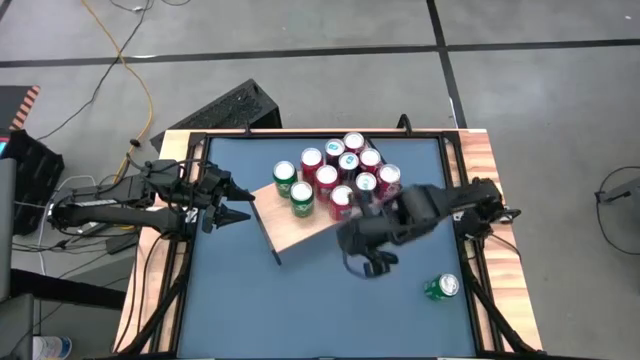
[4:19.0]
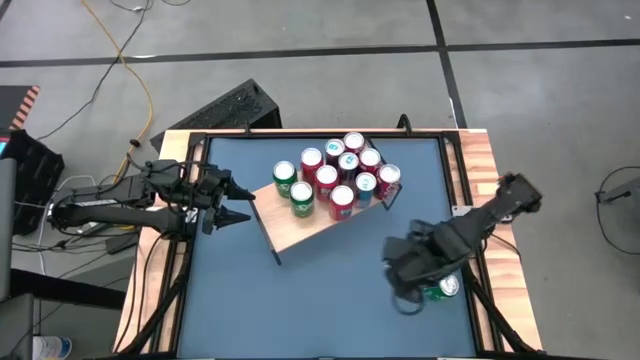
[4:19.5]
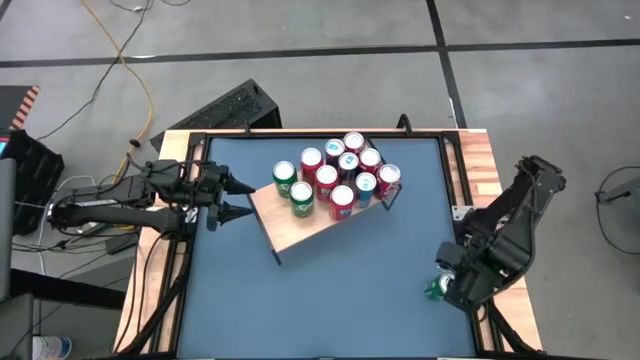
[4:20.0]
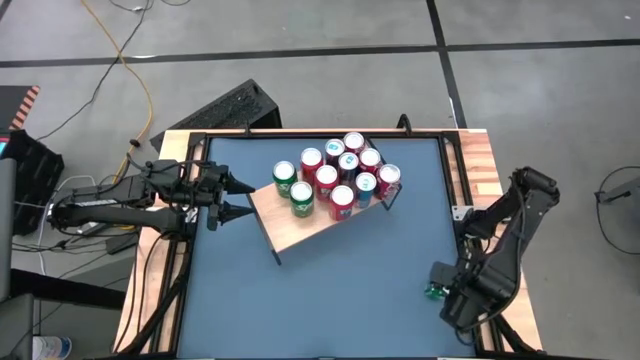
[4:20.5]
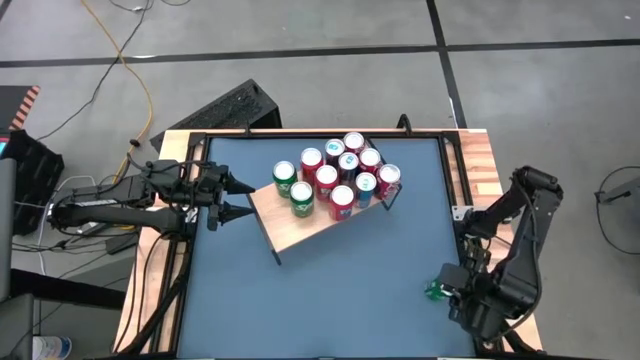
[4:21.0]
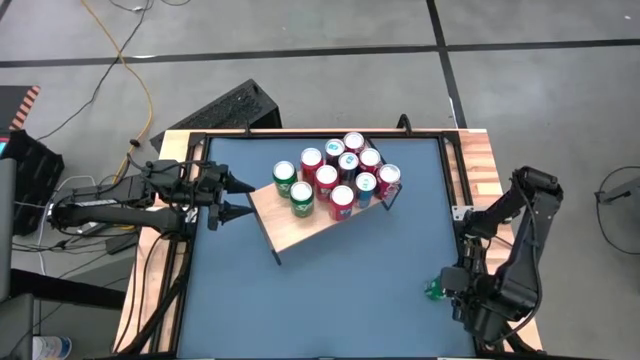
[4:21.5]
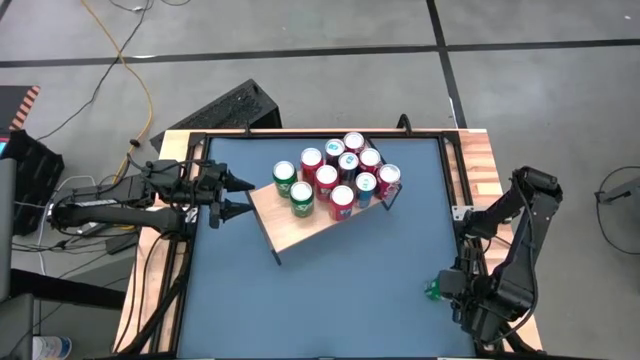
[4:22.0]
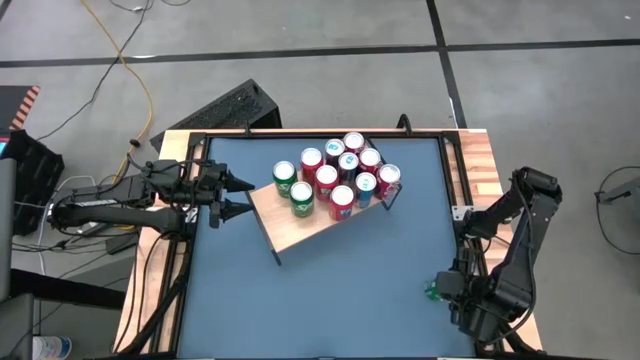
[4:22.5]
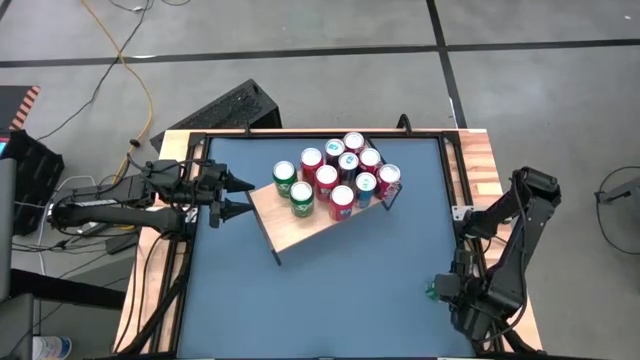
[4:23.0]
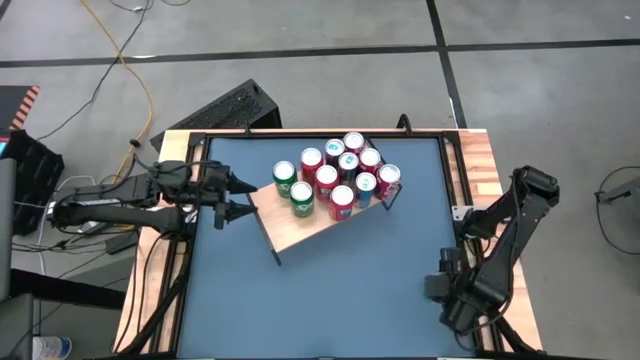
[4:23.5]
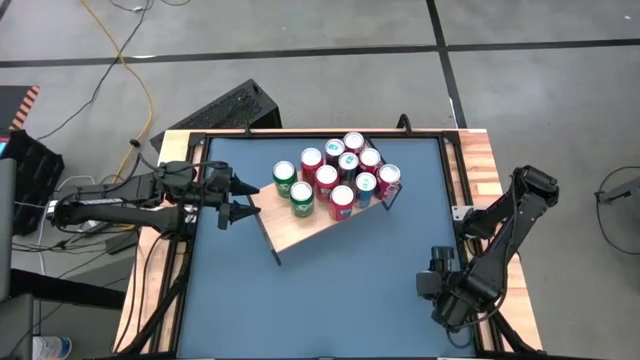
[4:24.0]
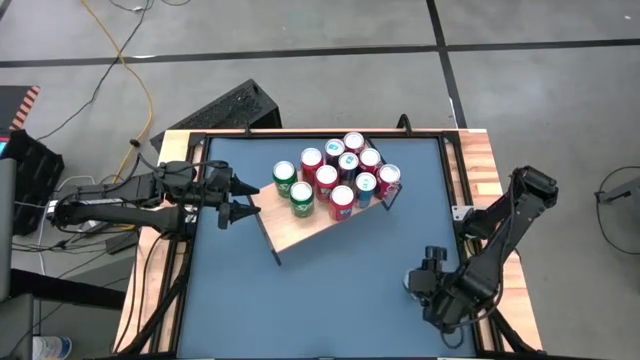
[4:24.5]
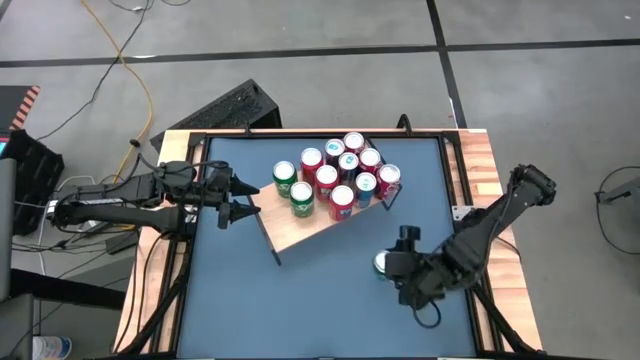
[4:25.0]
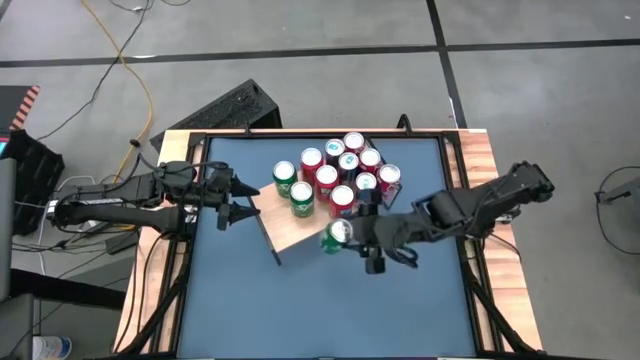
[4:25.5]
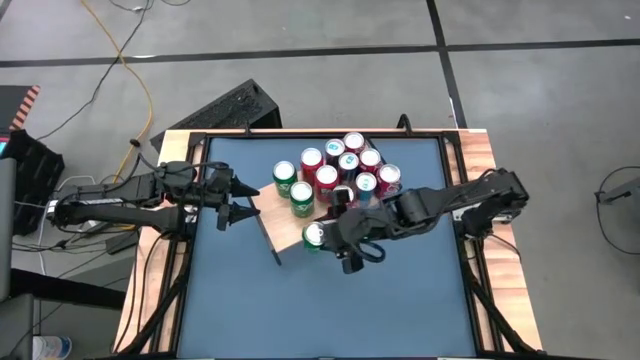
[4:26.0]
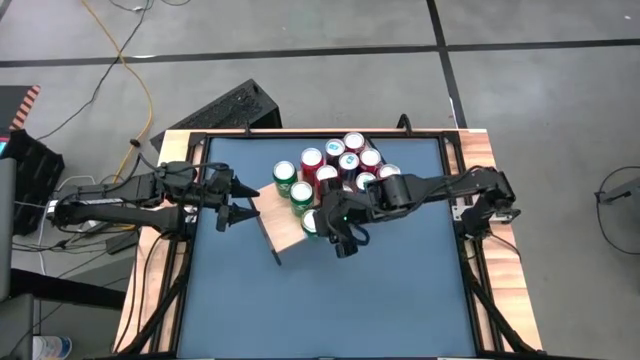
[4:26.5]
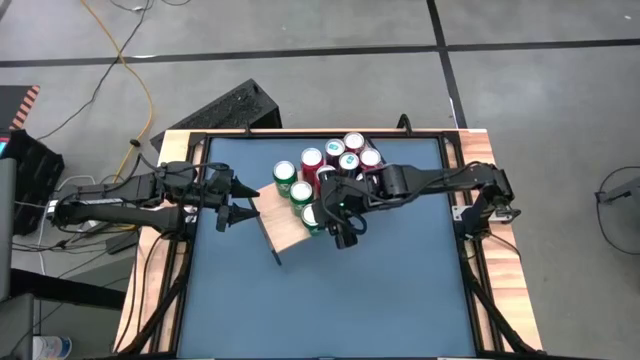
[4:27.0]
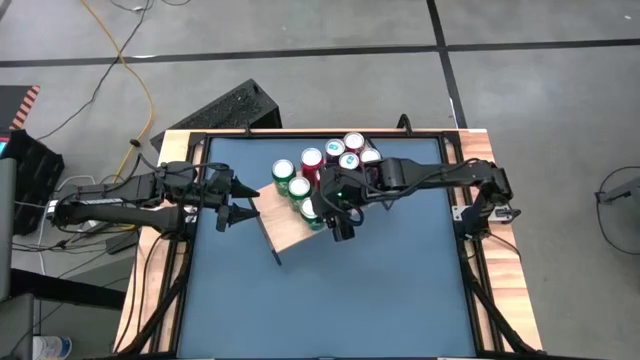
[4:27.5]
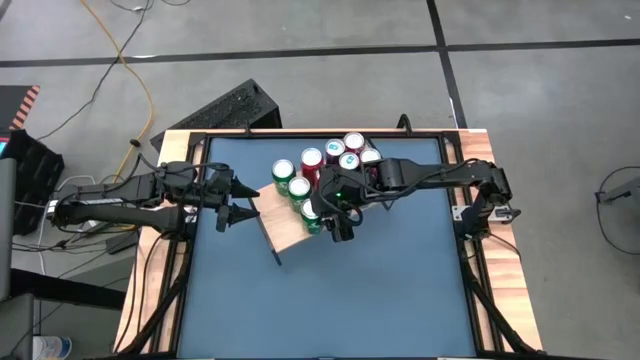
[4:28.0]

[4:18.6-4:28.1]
Task: Place canned beverage on shelf
Put the green soda can on the shelf aligned with the other green soda cans

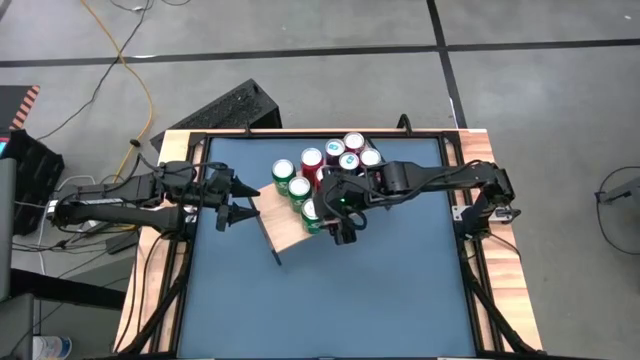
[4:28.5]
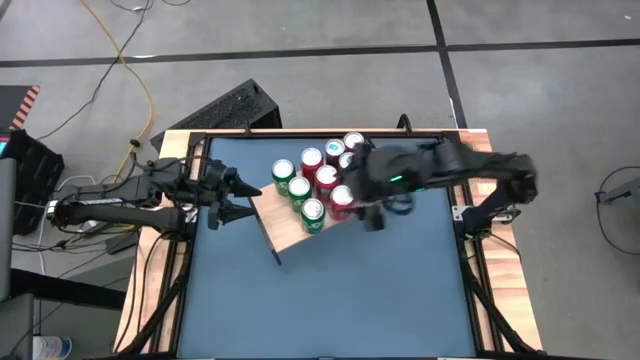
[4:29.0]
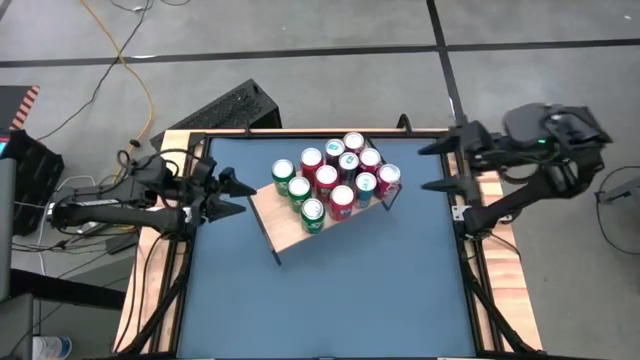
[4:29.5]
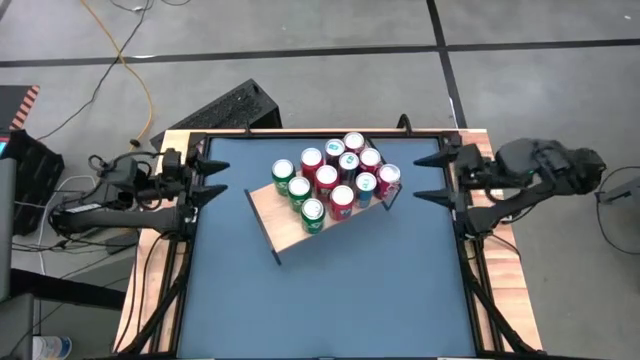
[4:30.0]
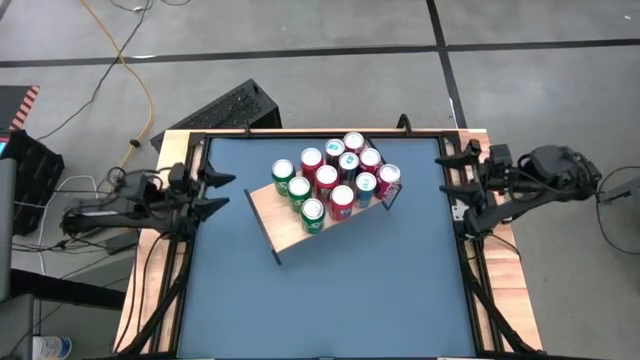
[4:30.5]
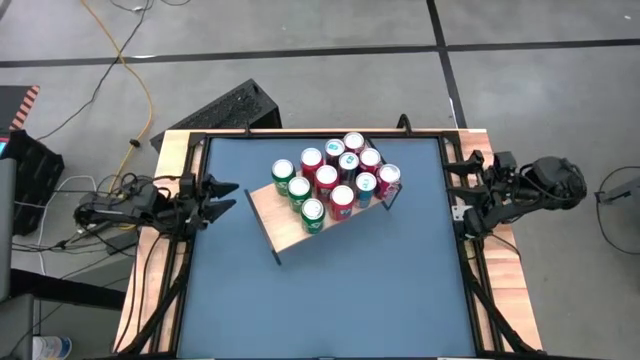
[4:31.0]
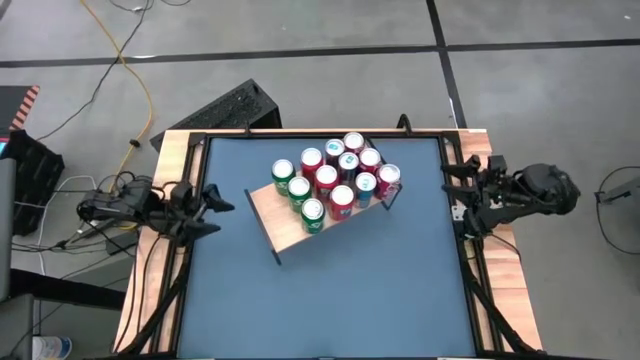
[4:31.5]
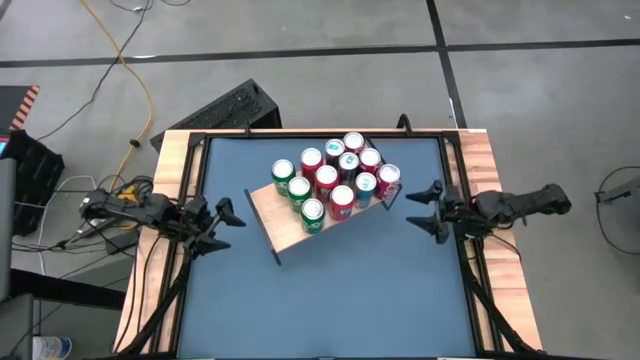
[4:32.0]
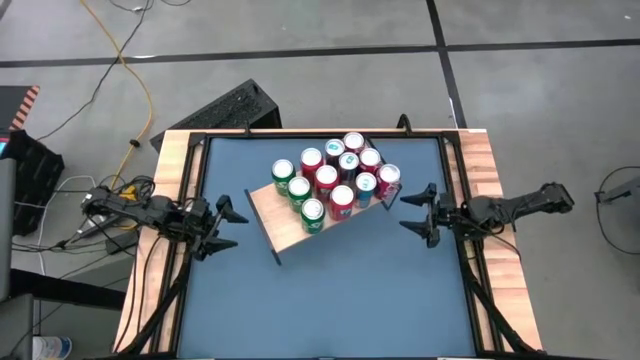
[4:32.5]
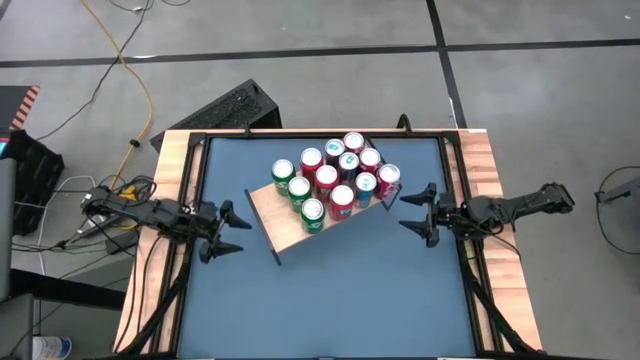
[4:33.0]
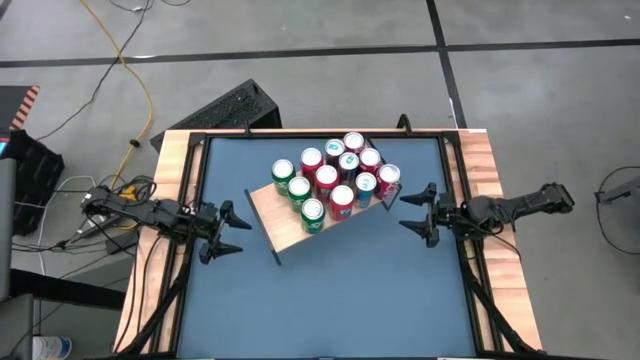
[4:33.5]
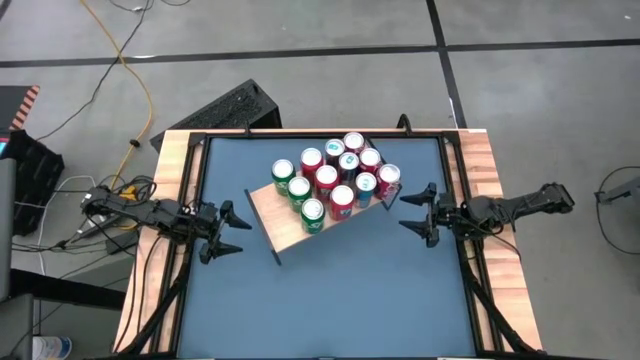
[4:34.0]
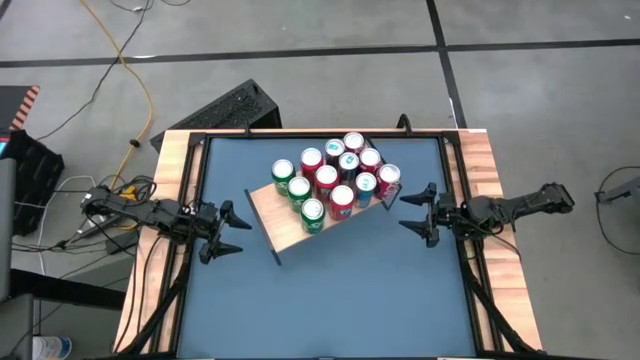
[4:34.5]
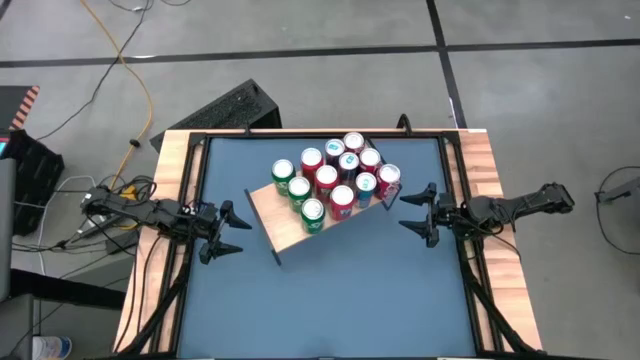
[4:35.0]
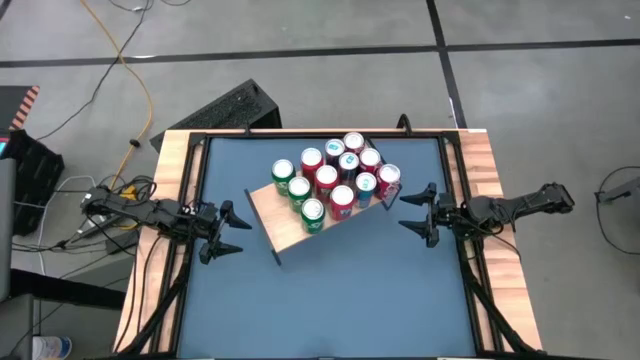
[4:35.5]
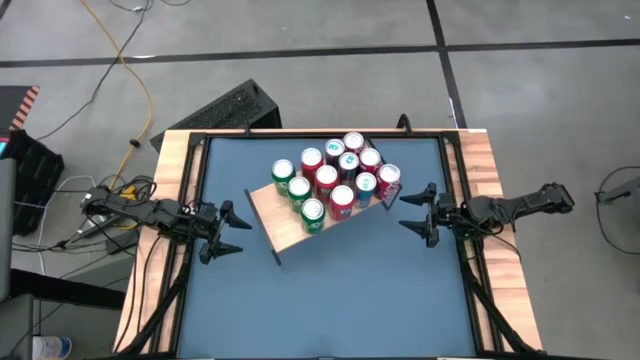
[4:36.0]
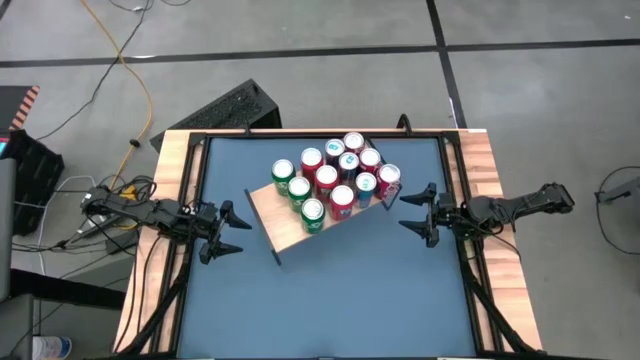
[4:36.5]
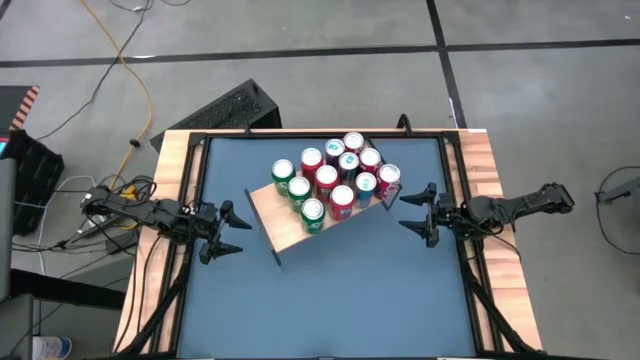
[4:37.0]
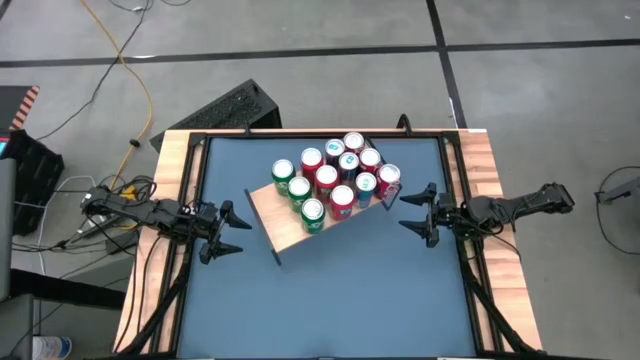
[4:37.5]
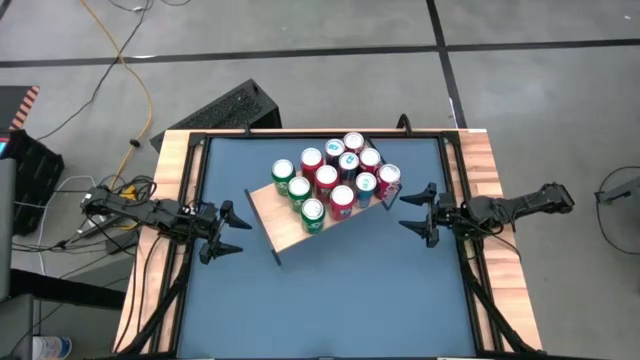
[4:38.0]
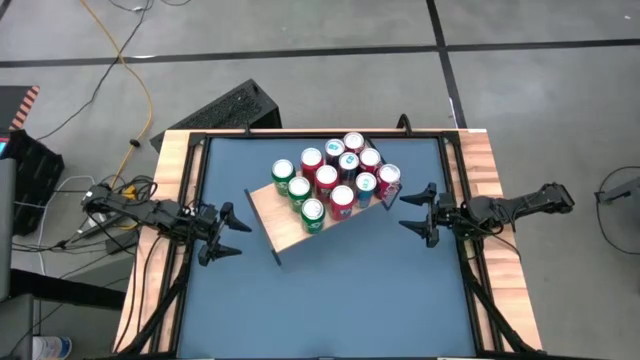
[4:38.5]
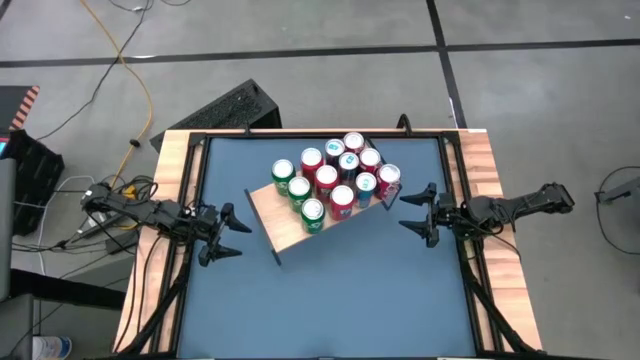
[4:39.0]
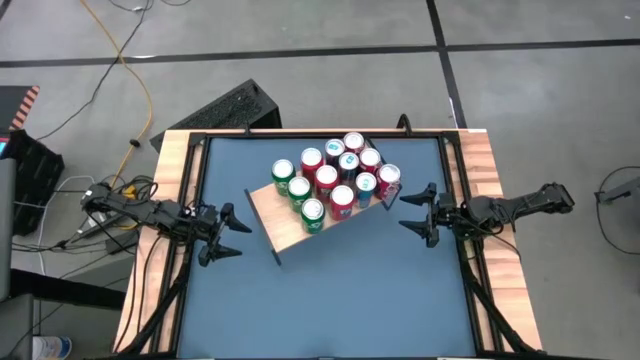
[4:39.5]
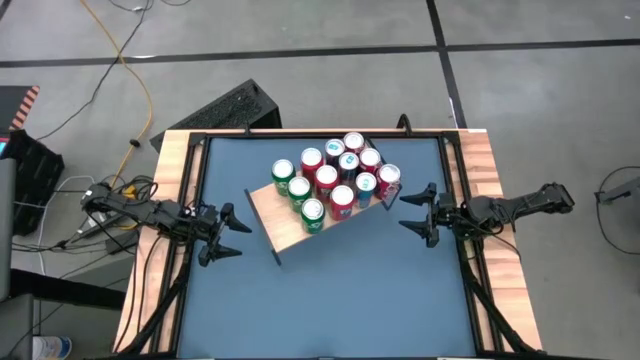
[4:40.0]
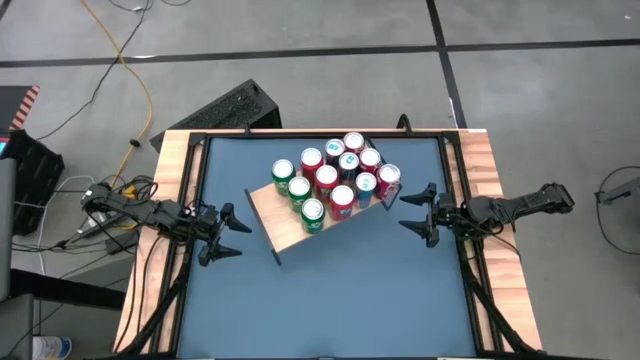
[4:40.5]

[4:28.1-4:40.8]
Return to Home Position
